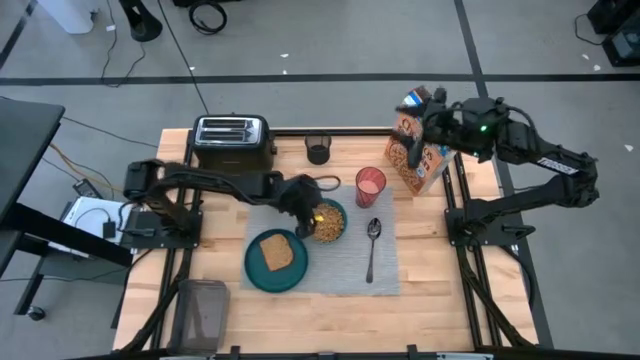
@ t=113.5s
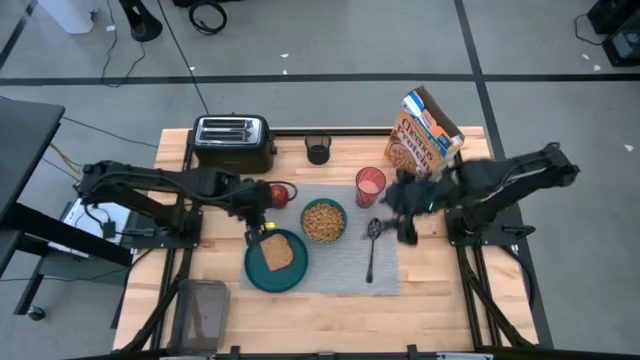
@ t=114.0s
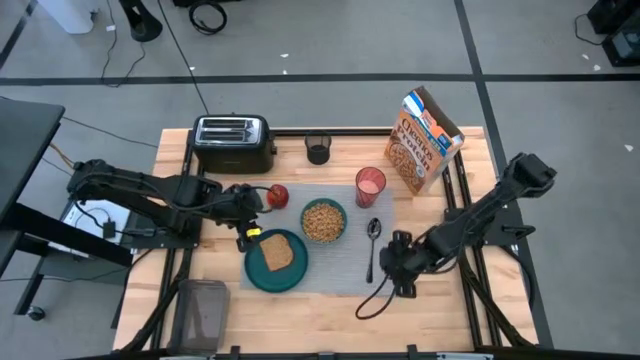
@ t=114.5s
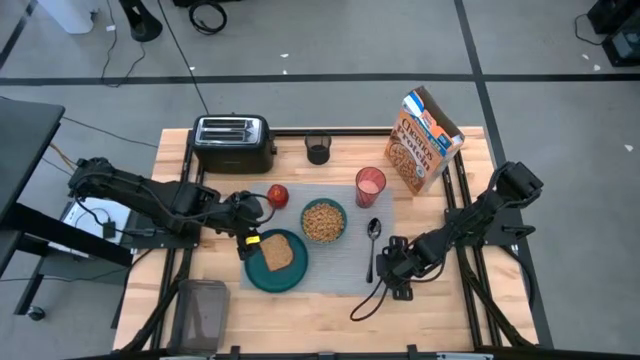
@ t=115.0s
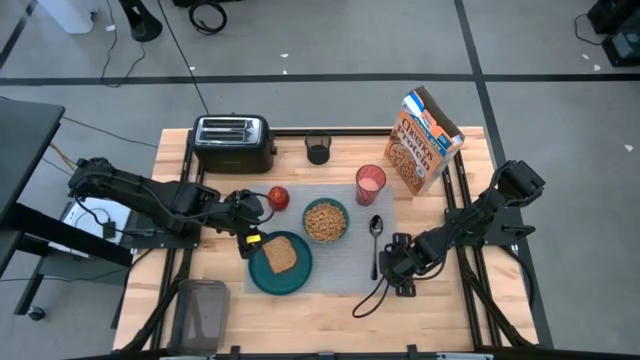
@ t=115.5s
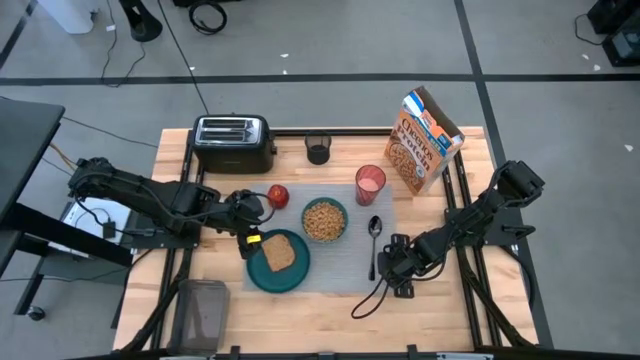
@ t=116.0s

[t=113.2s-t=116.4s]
Task: Arrange a breakfast setting
Adjust the gray placemat

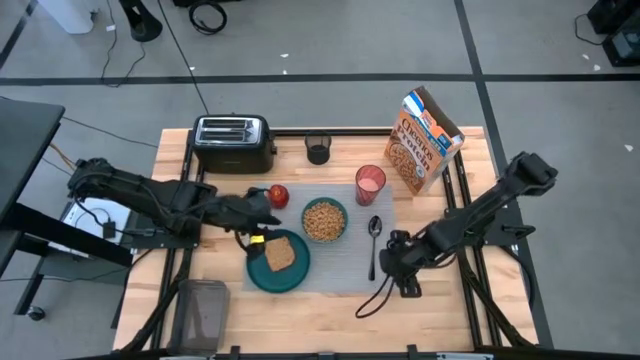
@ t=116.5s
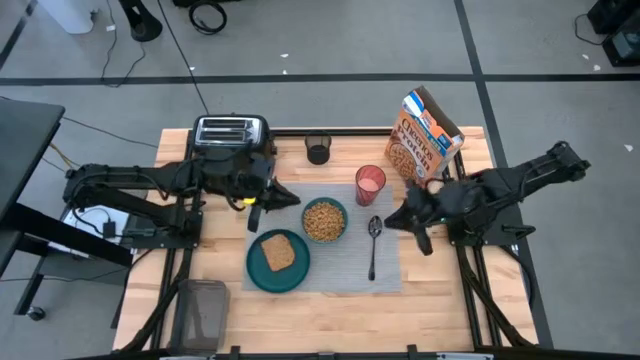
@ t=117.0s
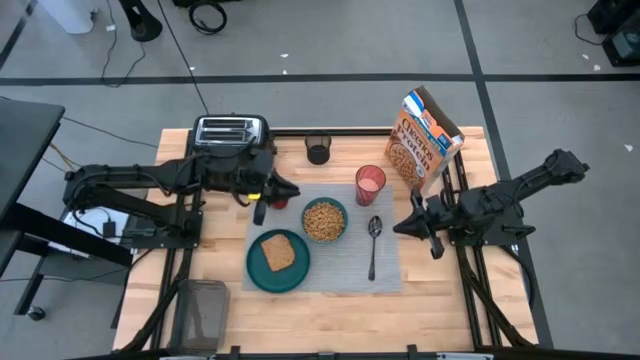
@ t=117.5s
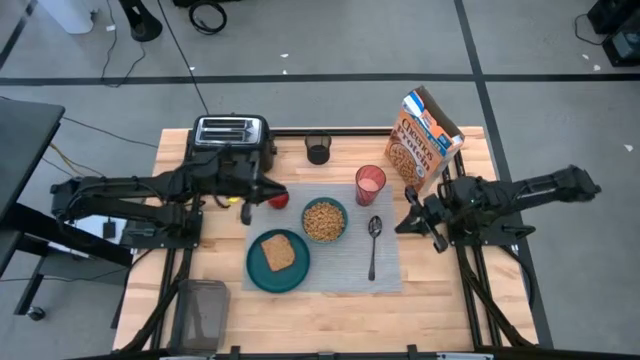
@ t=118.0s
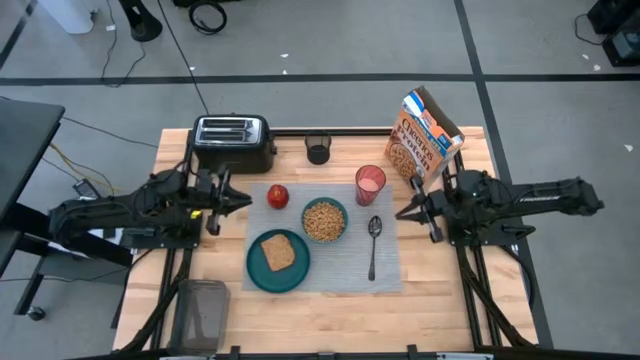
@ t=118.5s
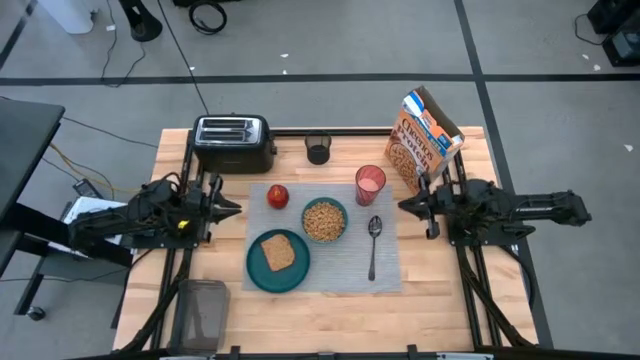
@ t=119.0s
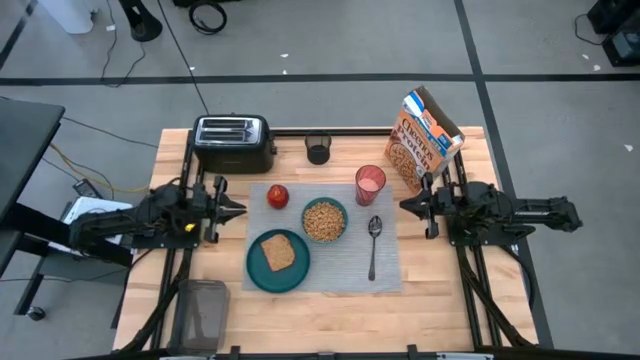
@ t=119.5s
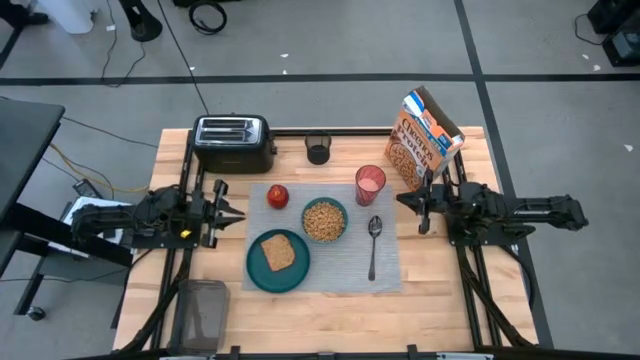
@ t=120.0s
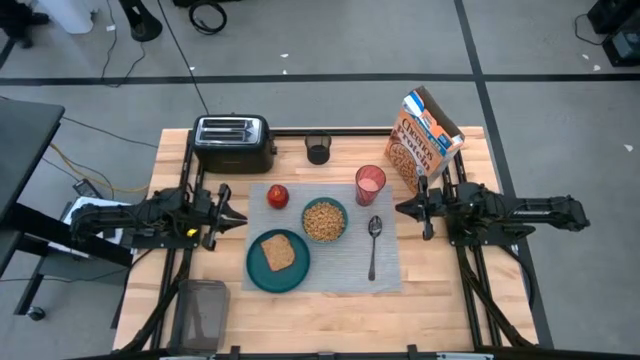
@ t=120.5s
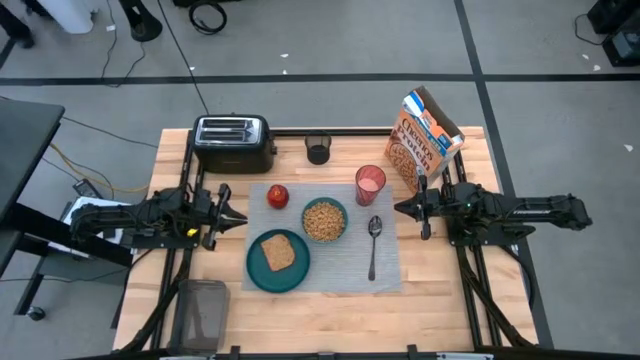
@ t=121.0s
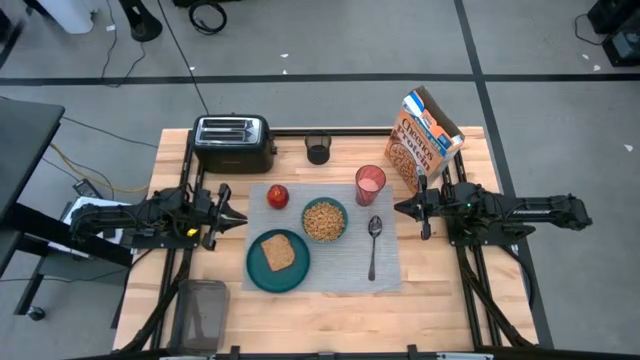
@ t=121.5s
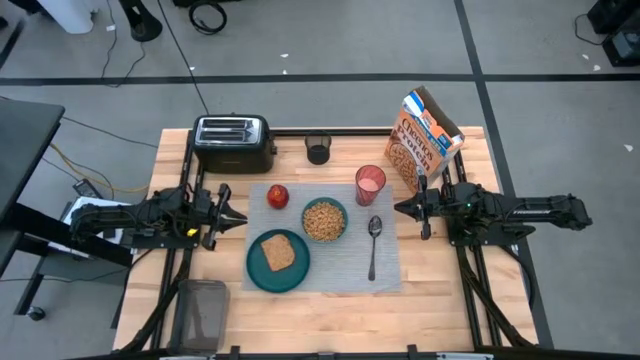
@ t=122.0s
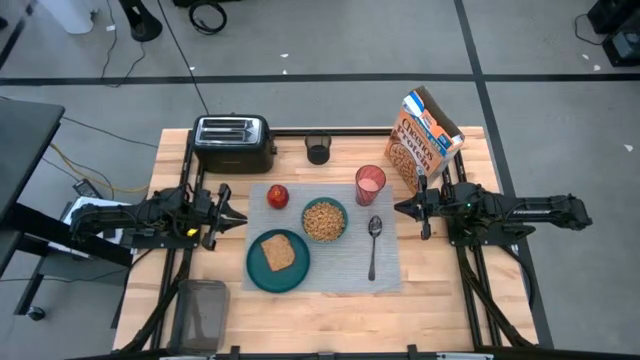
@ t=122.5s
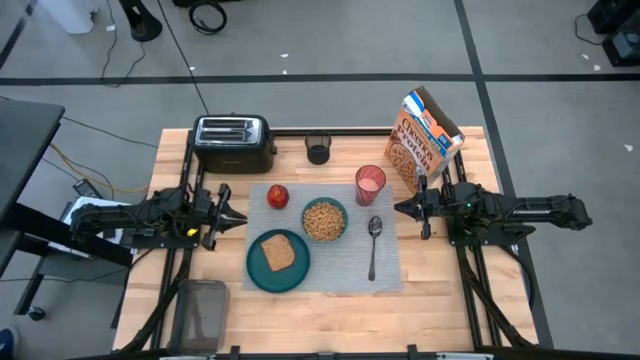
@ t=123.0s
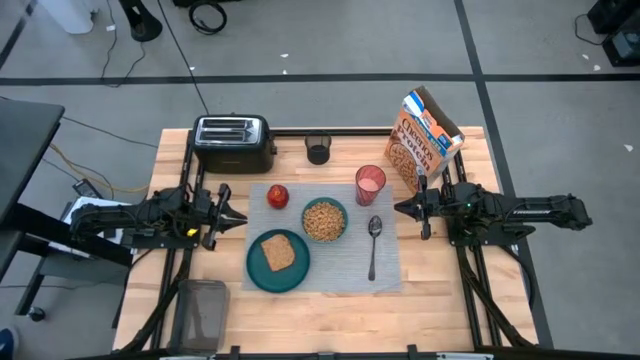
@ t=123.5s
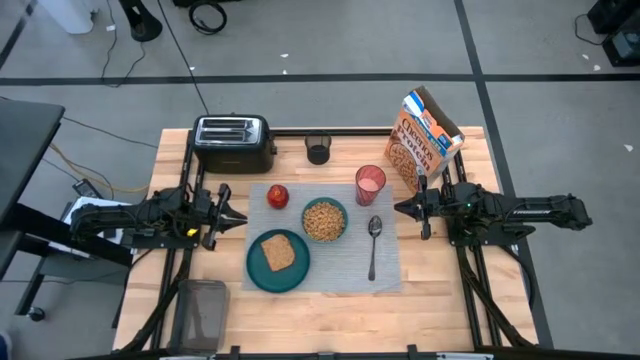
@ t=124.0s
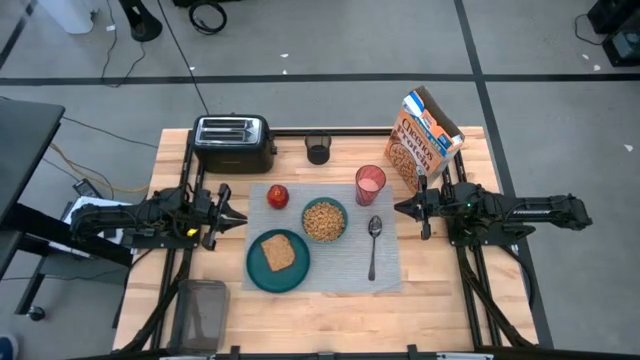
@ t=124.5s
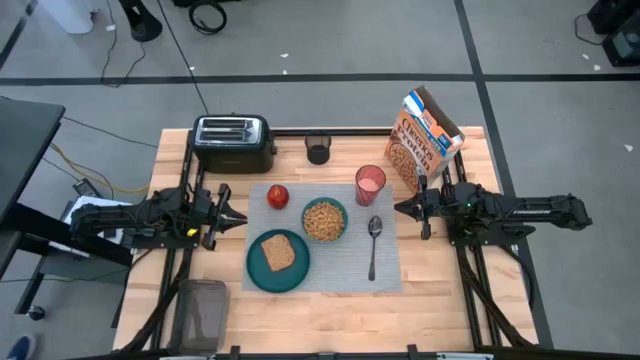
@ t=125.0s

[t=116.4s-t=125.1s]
Return to Home Position
